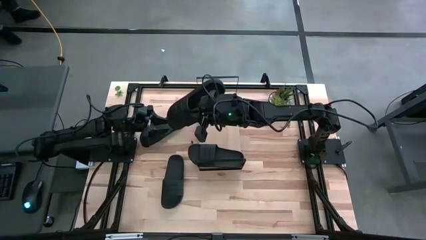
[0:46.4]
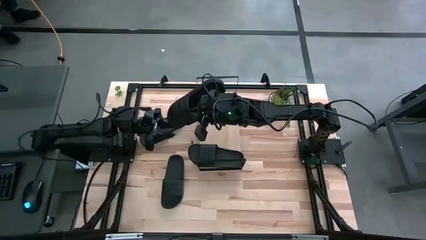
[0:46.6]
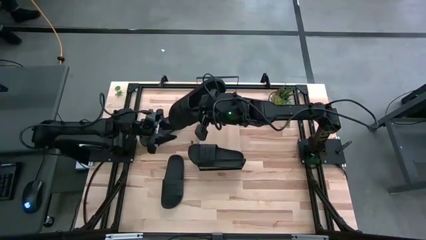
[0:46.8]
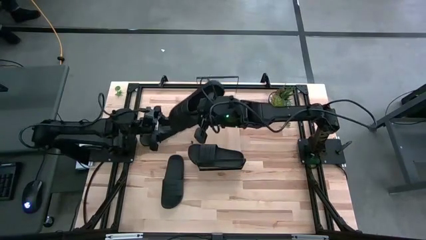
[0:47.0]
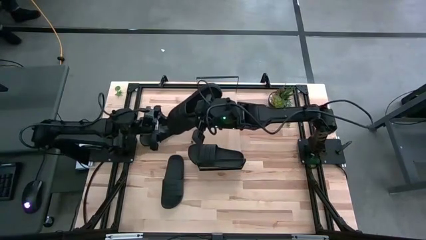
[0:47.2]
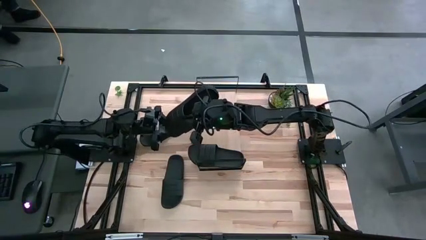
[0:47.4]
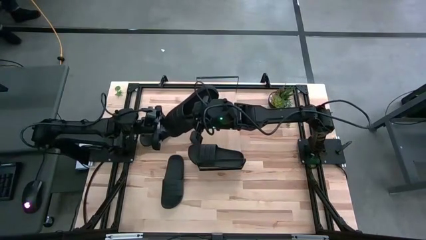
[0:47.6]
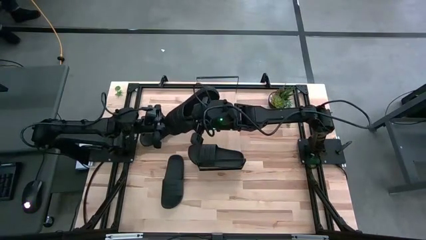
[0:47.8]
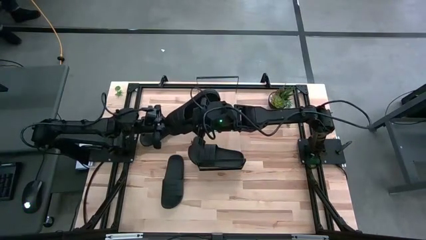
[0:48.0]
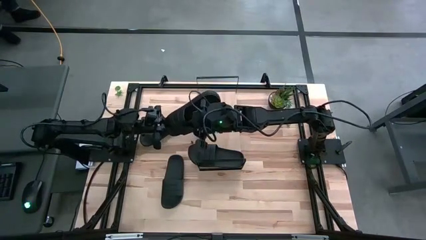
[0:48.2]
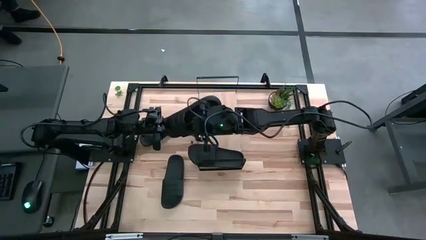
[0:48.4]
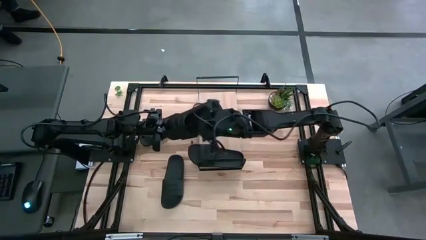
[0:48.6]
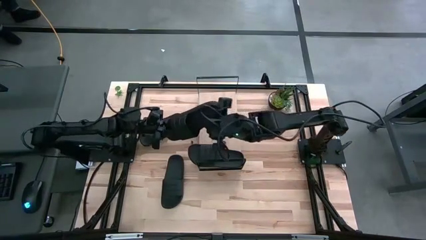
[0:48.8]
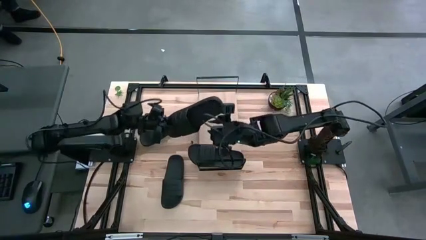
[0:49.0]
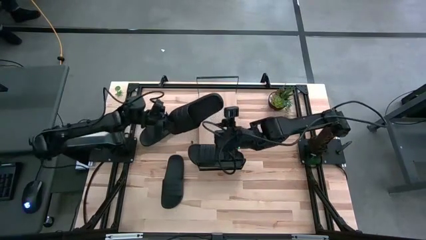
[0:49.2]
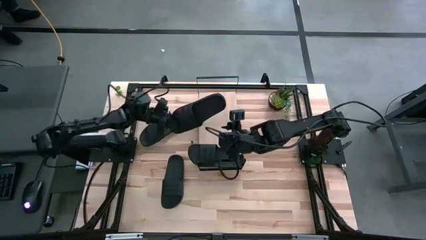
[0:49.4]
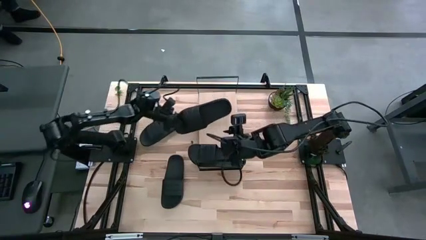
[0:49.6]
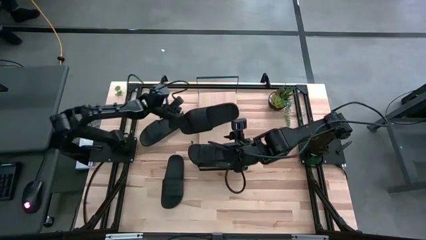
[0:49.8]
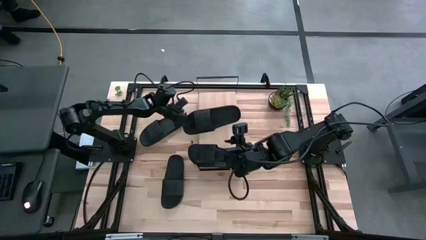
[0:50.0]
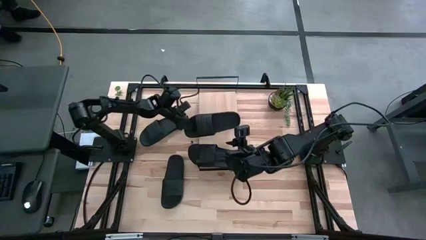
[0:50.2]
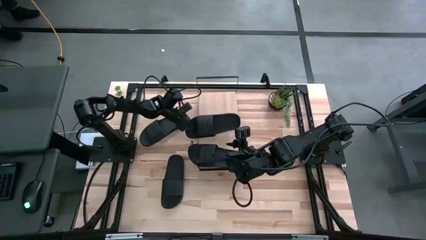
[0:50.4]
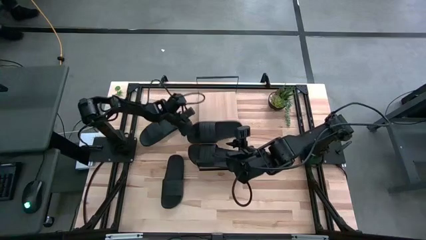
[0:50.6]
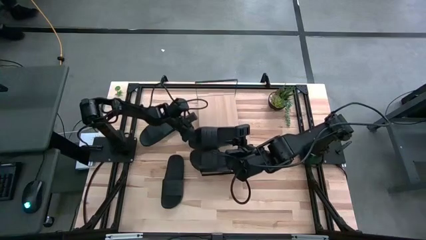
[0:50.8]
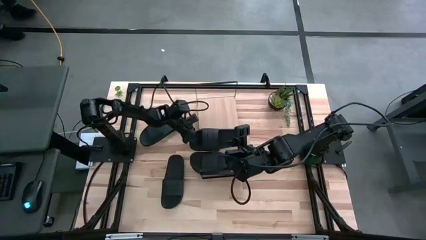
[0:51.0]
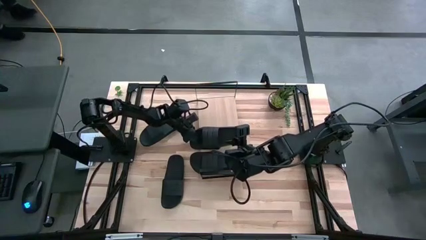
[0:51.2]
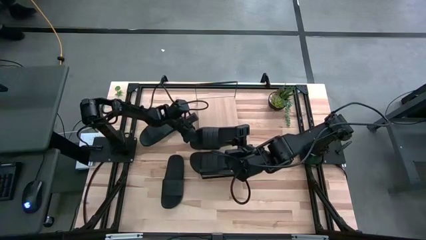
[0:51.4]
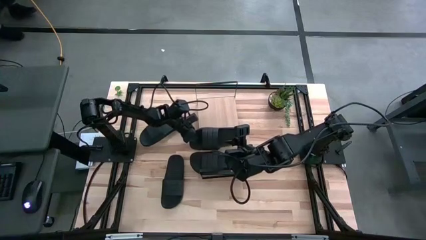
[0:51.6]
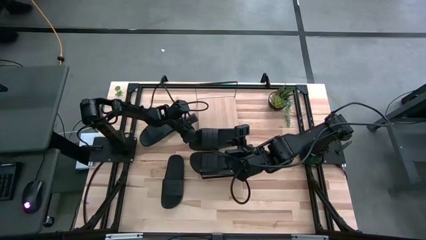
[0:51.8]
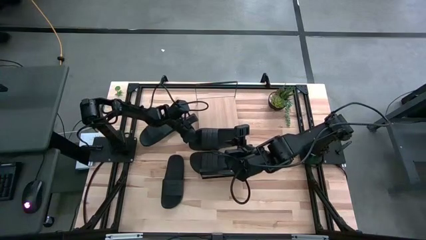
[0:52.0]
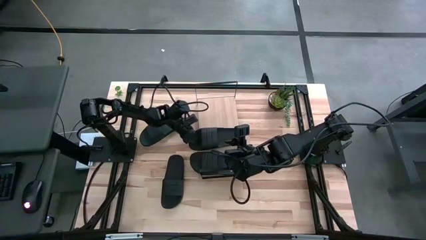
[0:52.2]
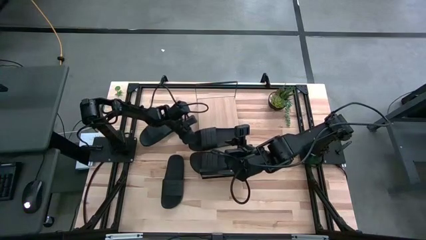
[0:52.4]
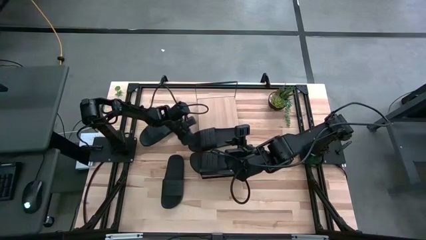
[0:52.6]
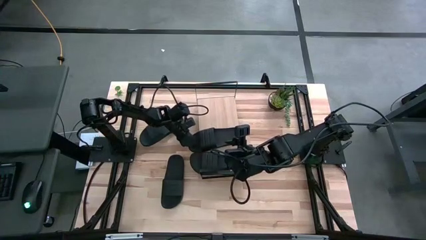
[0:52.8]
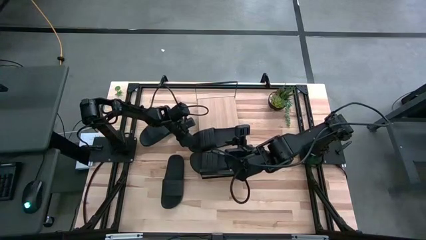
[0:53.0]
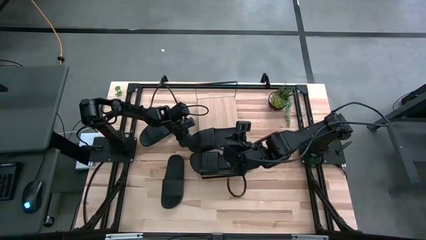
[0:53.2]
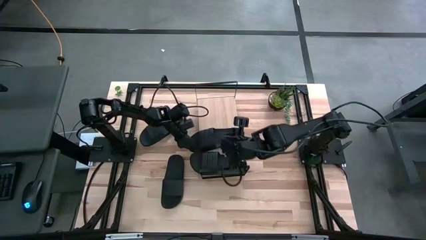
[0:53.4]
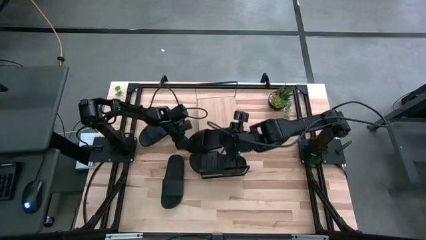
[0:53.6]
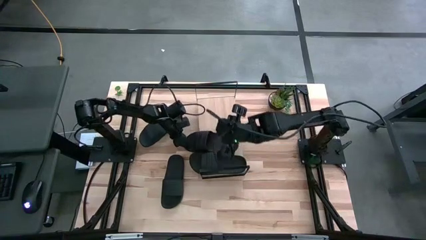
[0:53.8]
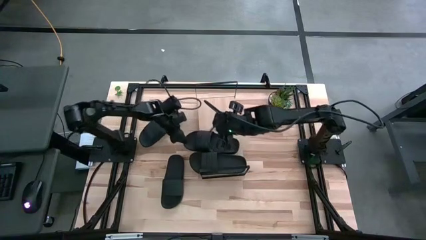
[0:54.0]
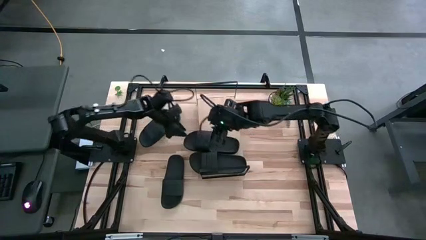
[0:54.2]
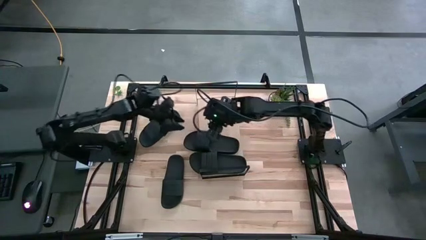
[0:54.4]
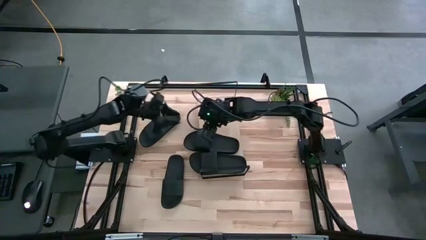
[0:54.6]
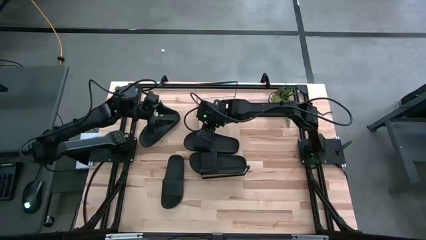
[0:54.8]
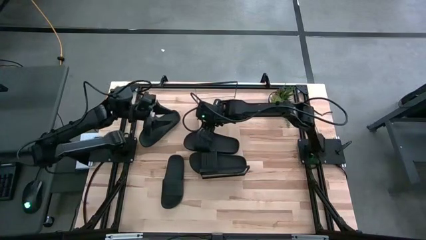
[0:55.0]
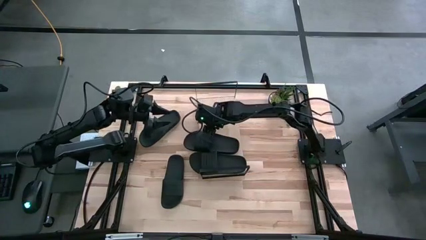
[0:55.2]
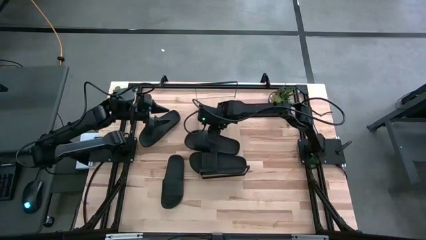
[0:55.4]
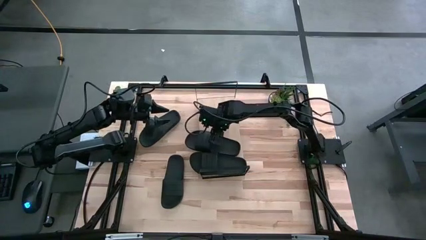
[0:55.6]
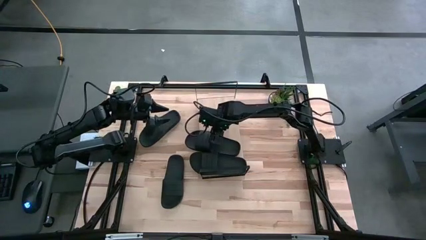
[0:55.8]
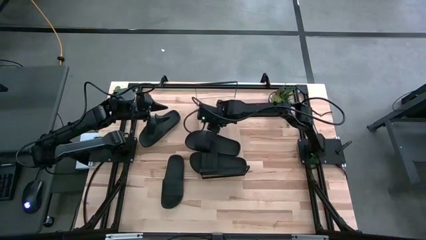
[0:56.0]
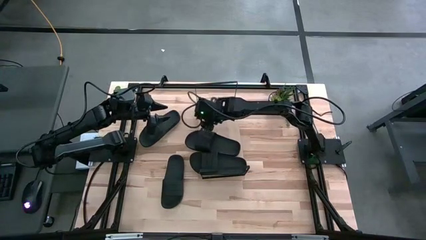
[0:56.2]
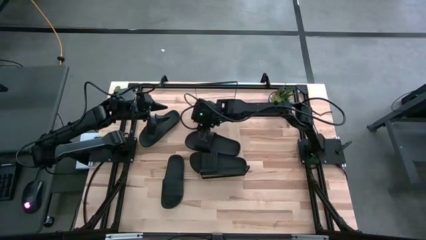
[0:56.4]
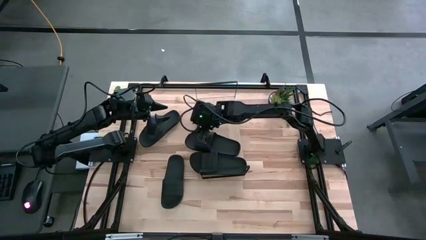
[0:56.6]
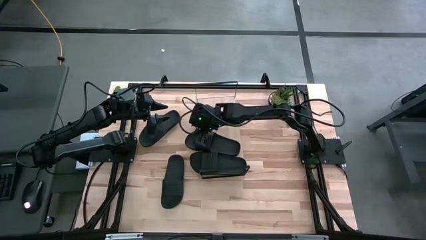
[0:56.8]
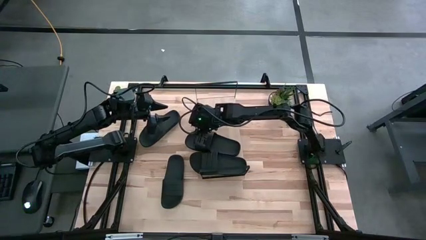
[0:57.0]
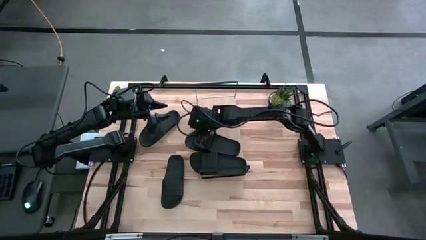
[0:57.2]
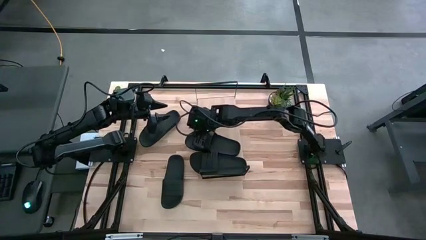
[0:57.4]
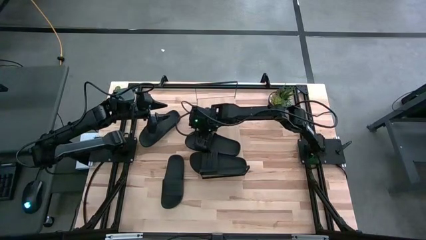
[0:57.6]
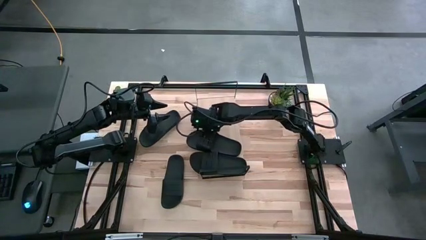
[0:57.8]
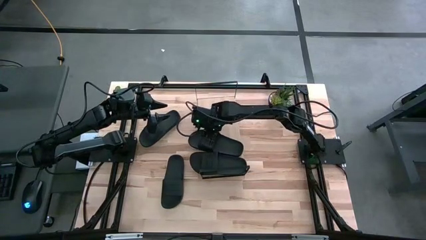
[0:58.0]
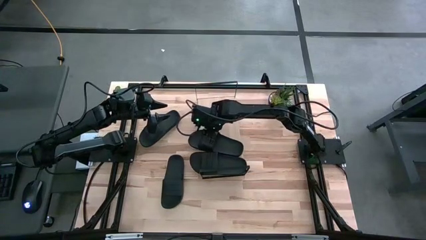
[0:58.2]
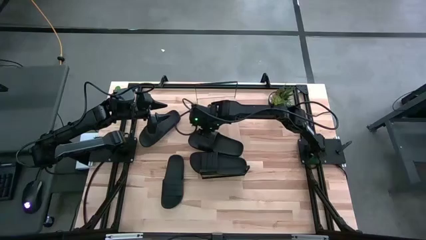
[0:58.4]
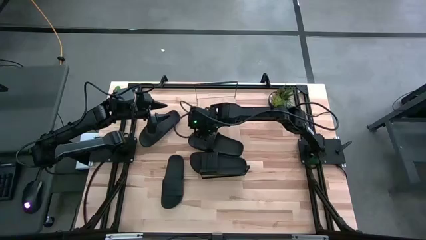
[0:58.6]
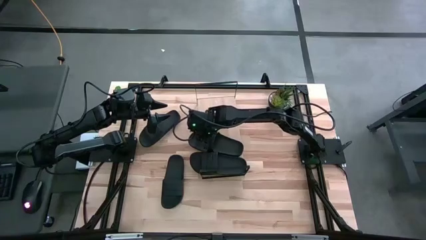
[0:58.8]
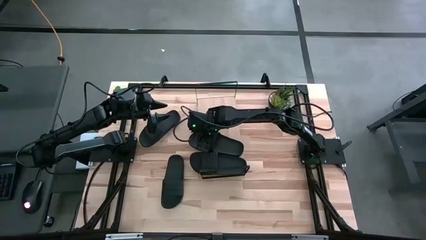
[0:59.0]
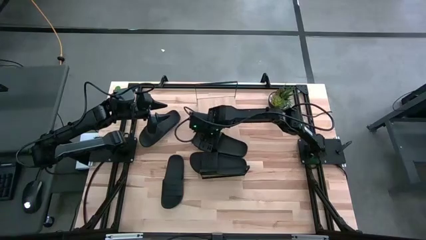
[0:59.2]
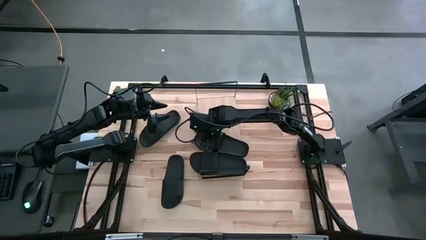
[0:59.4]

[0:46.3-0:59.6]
Task: Pick and place slides into the shelf
Put the bottom right black slipper on the shelf
